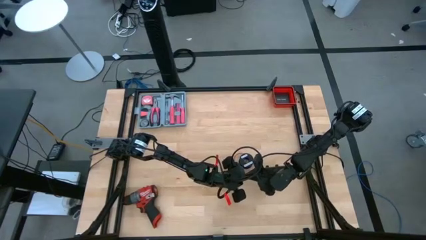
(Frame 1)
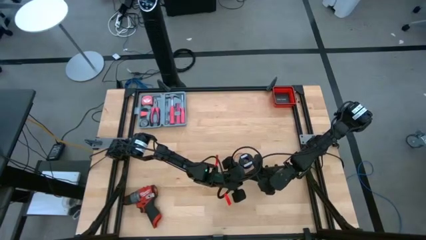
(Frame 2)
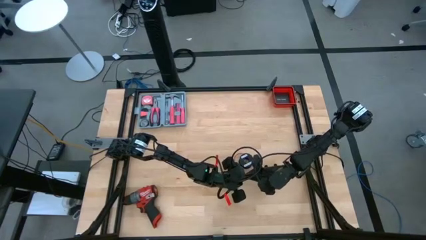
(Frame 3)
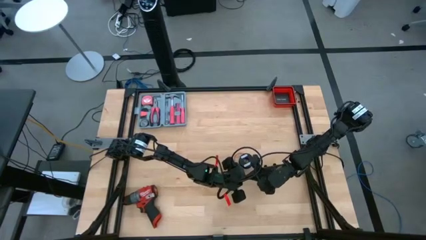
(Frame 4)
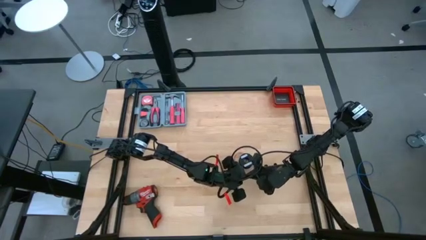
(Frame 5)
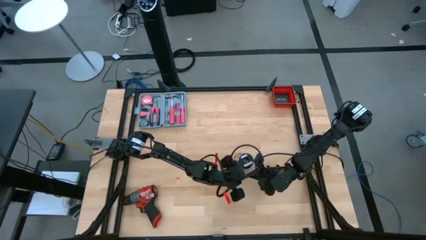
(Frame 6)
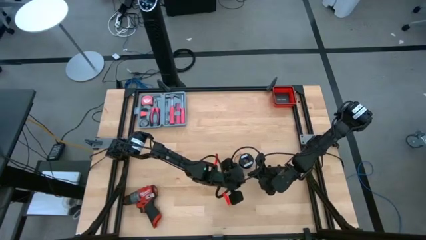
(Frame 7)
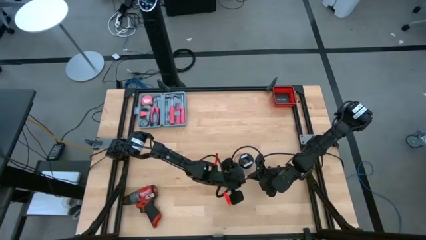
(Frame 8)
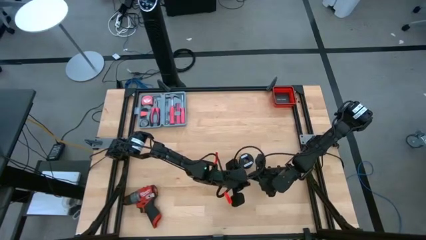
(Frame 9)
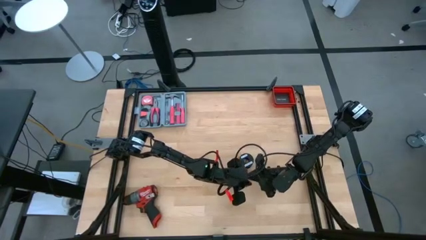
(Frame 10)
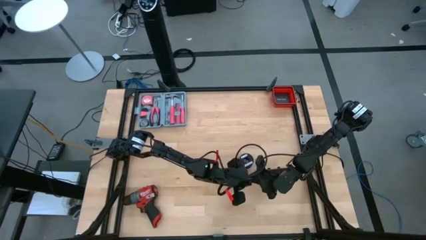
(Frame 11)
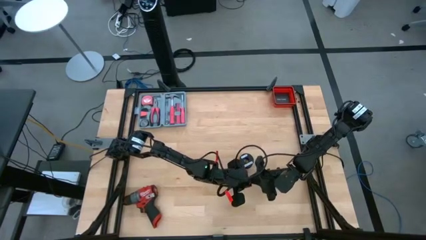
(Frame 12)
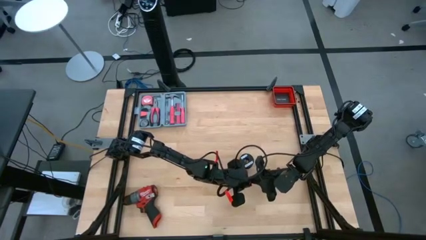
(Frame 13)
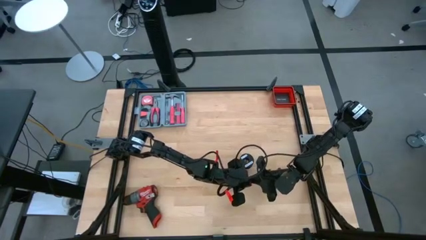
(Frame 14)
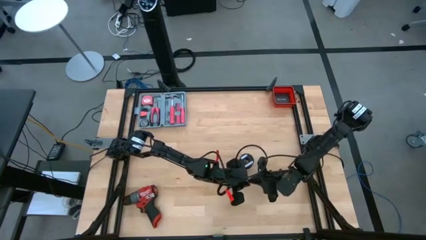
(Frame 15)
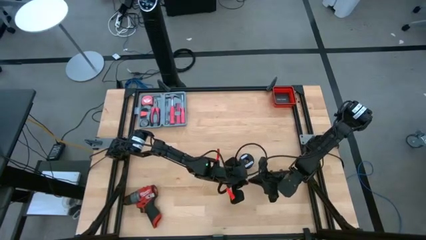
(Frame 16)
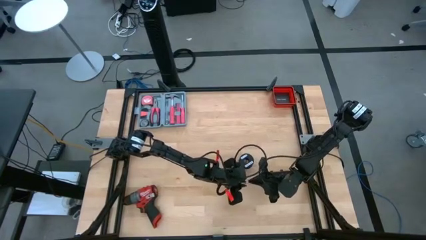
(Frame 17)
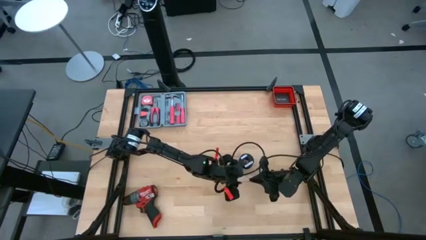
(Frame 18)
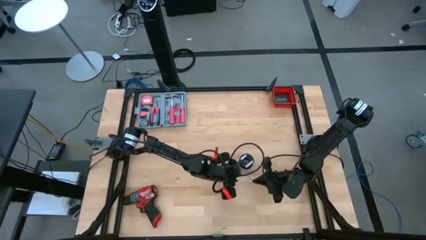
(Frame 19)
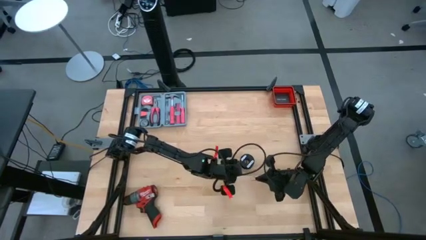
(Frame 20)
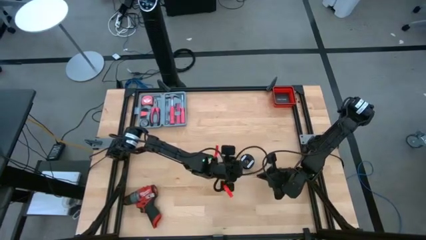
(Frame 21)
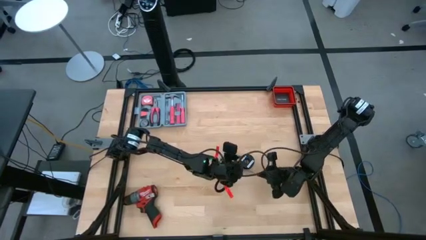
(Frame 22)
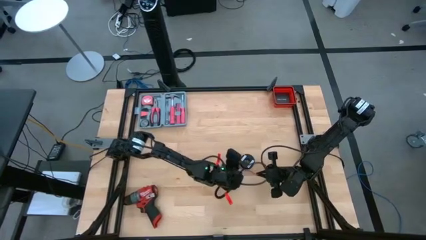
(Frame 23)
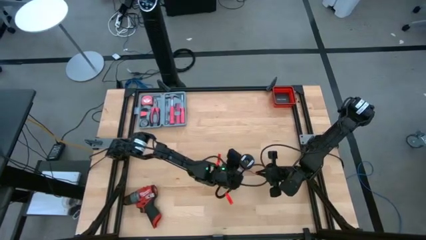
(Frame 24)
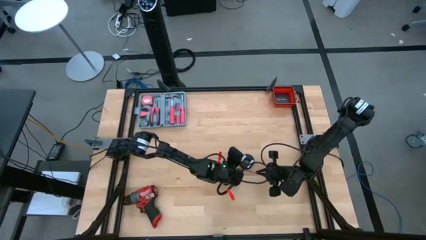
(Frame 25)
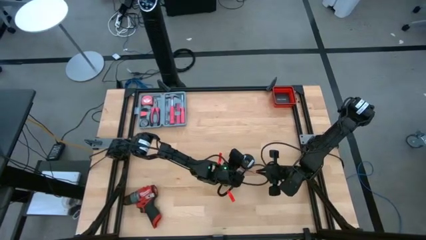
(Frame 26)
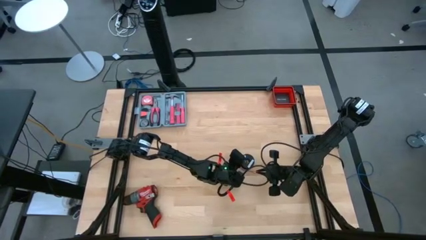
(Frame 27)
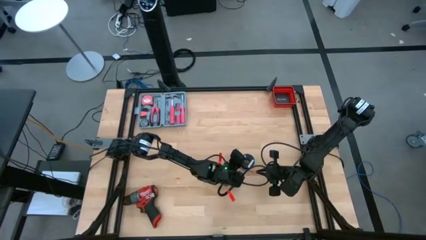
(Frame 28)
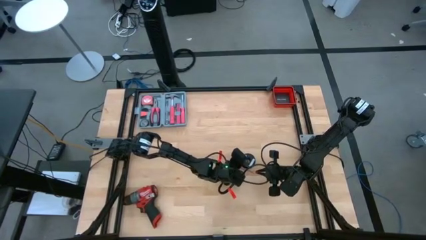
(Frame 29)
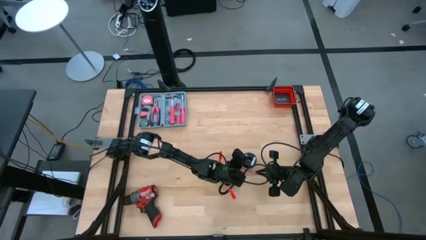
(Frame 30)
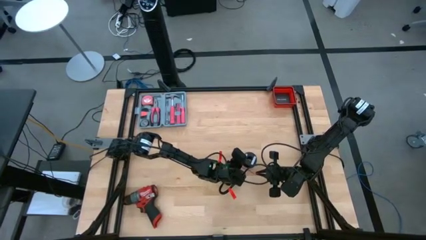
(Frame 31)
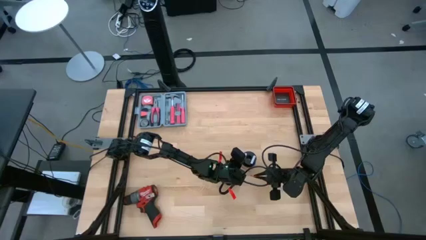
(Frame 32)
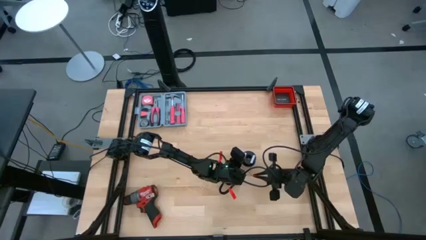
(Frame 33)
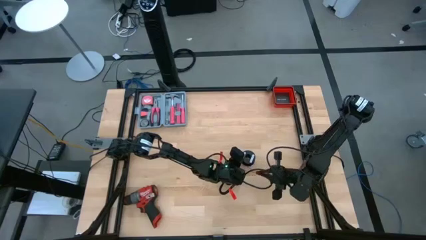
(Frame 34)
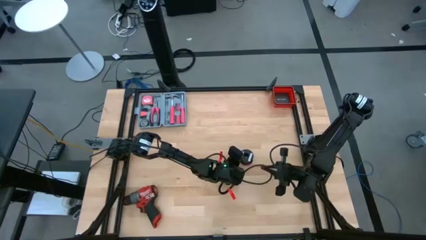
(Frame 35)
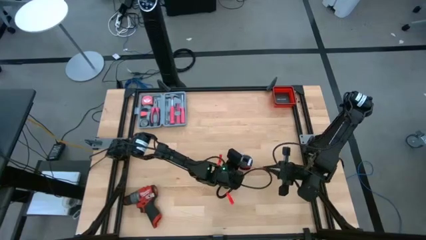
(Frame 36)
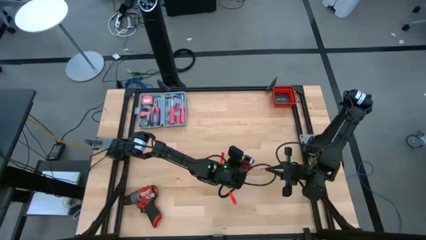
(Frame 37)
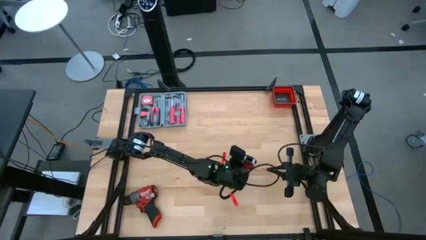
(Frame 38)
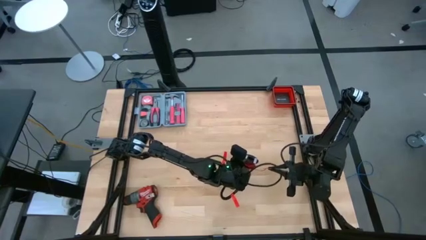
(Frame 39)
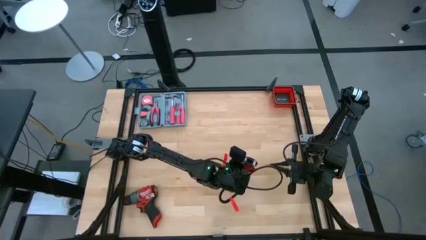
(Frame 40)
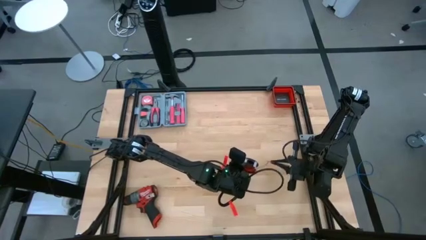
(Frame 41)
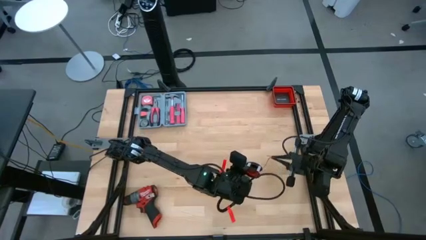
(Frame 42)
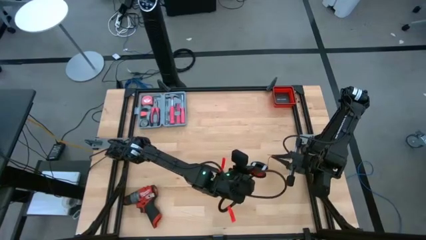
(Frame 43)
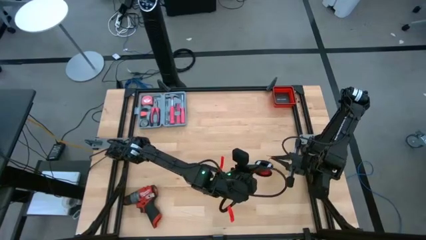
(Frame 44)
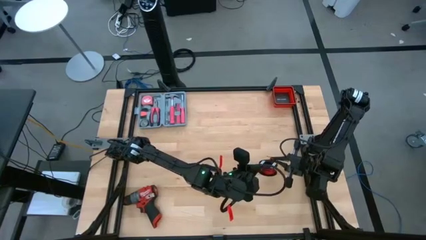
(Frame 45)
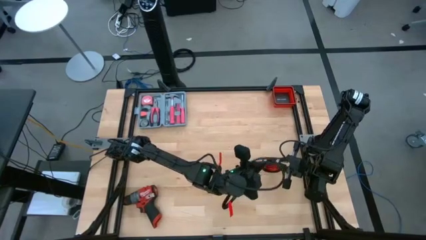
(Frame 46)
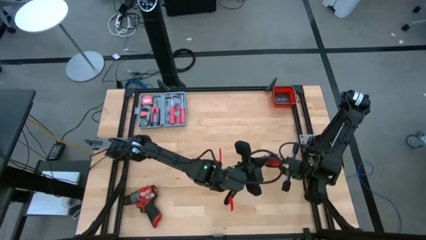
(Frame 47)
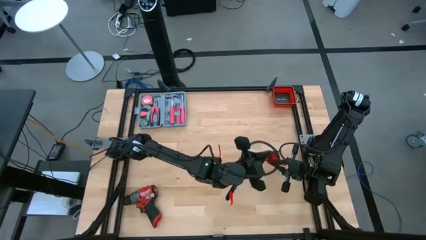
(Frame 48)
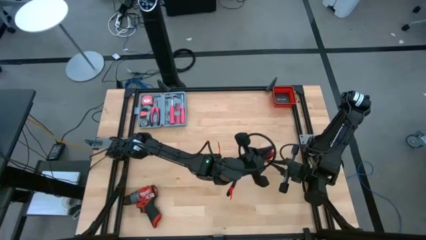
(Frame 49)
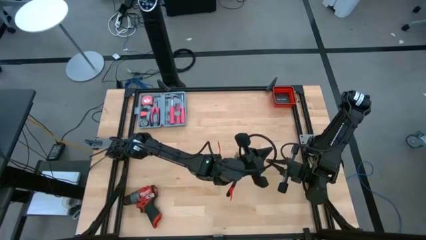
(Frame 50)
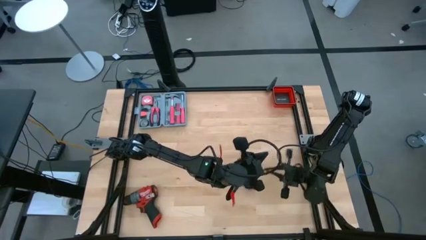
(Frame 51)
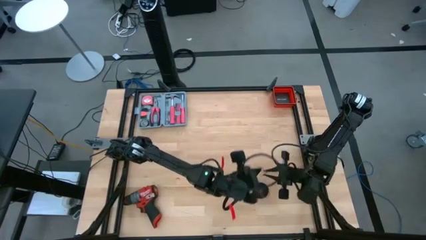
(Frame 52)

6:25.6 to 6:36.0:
Task: Coil cords
Coil the red wire onto the spool
